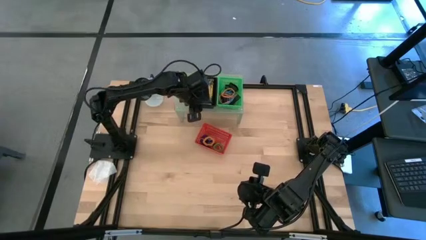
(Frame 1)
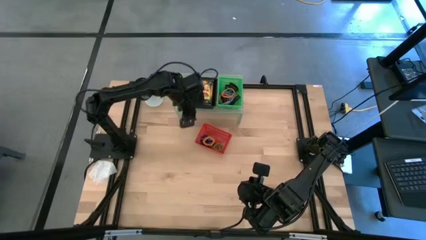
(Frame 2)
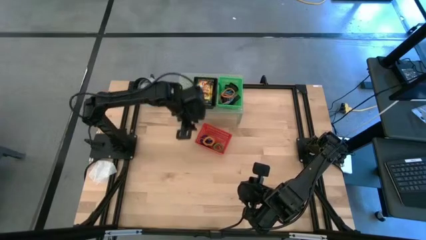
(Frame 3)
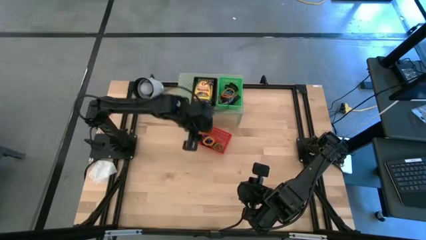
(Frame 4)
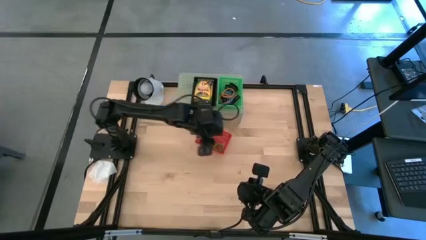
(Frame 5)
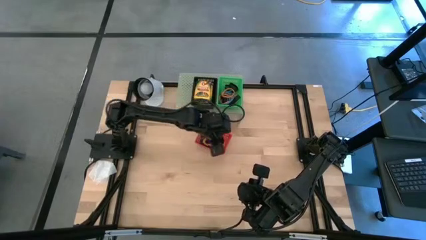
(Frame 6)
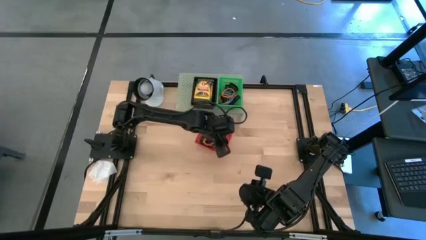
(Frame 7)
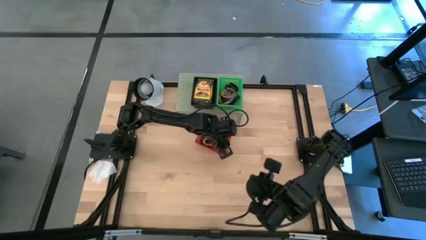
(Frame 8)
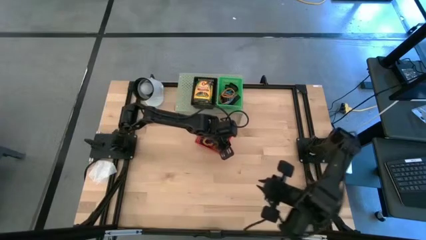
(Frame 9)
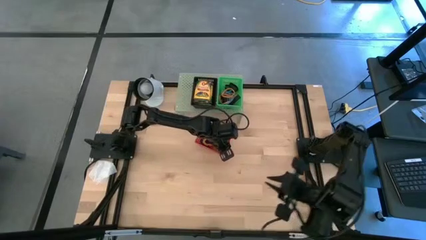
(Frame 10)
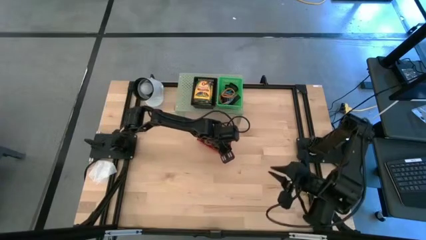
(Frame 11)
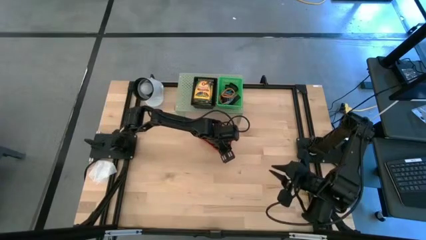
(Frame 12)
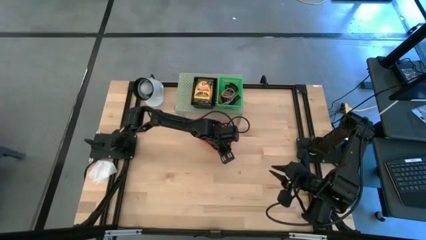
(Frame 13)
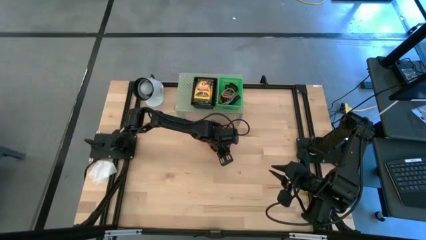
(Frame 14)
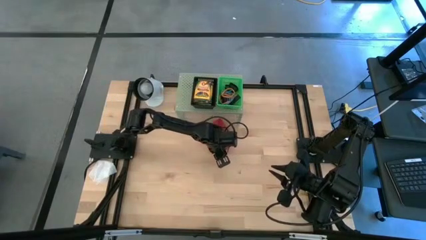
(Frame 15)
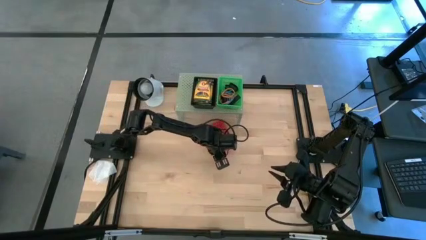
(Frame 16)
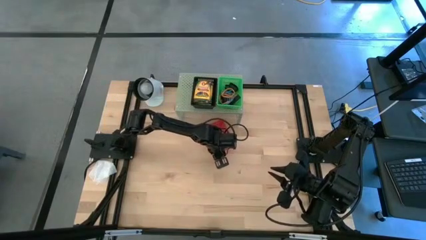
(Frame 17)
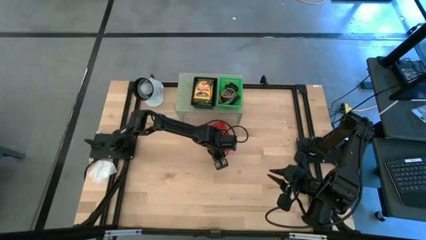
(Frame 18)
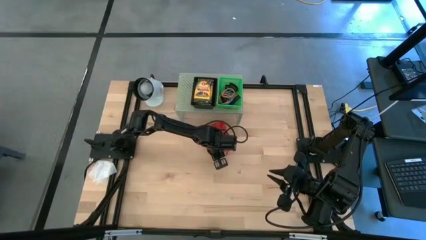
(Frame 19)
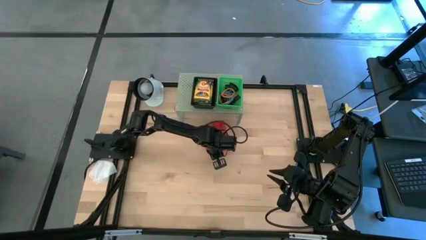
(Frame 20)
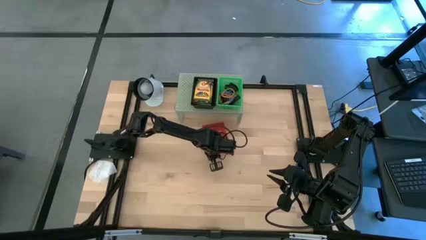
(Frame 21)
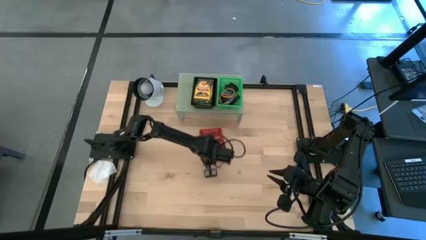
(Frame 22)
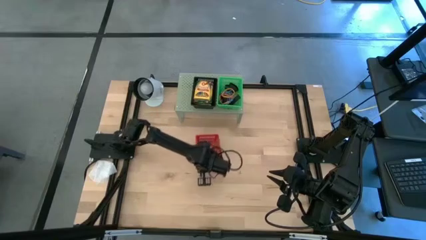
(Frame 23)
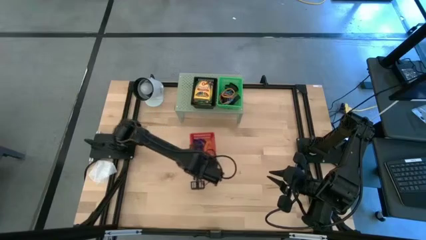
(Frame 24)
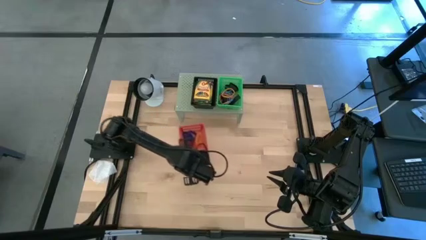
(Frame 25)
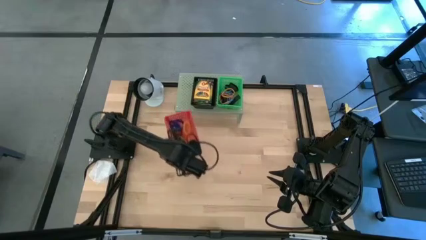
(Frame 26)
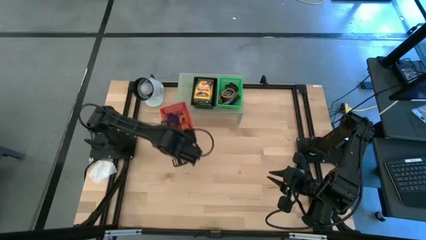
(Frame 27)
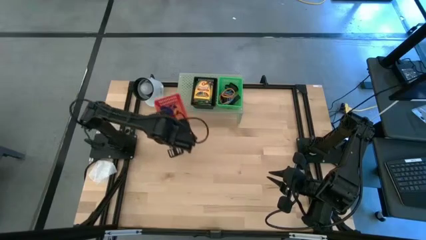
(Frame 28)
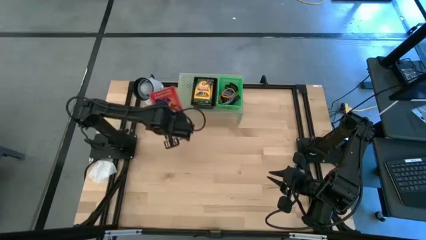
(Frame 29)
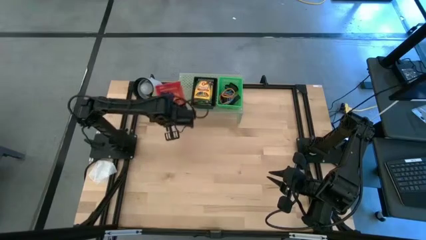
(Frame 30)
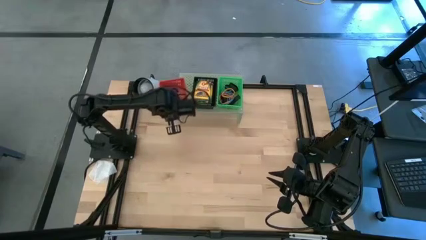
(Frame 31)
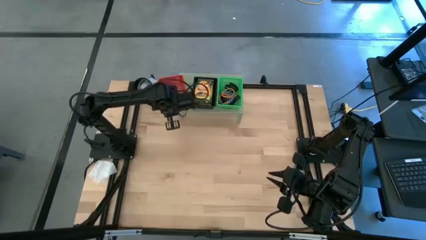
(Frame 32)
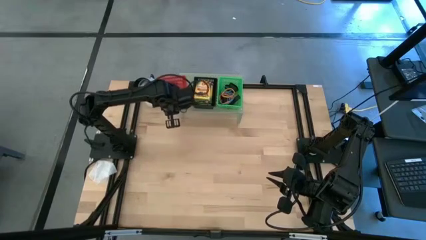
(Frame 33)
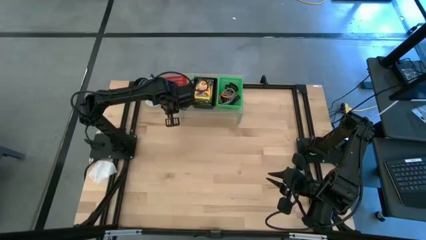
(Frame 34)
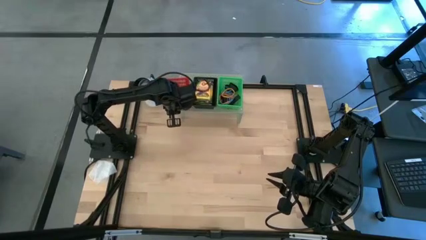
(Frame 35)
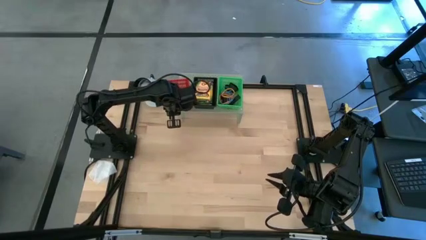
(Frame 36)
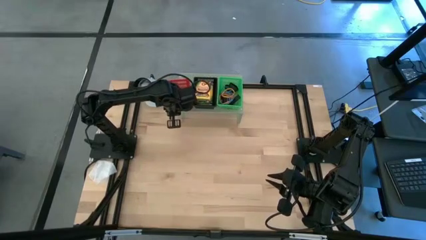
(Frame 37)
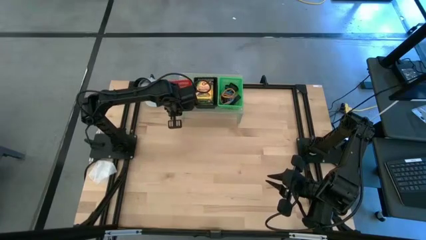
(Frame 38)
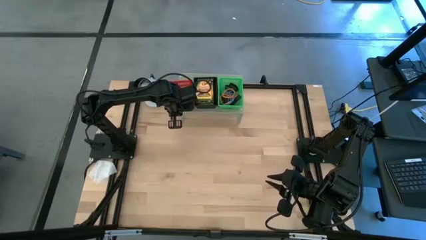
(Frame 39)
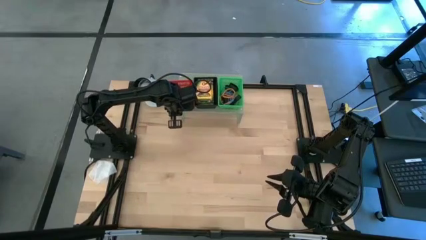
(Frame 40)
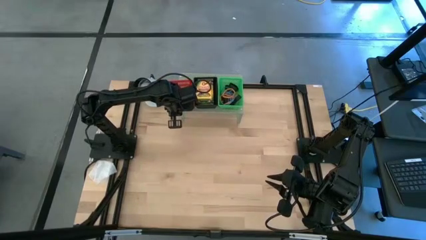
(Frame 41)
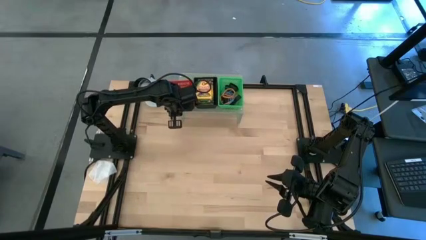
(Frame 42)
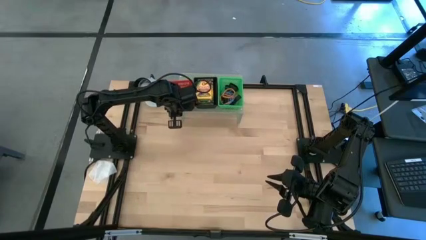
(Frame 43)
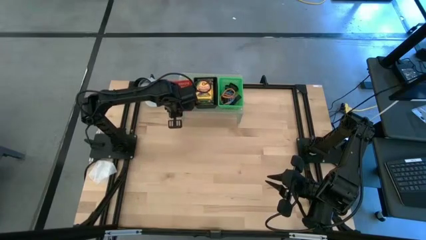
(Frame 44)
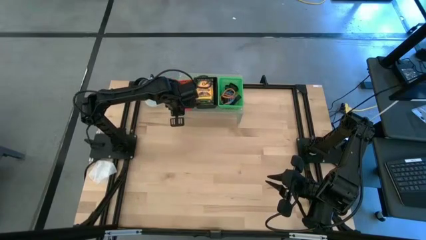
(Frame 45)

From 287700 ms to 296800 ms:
Task: Pick & Place Office Desk Supplies
Put the red bin filled with spring keychains on the shelf

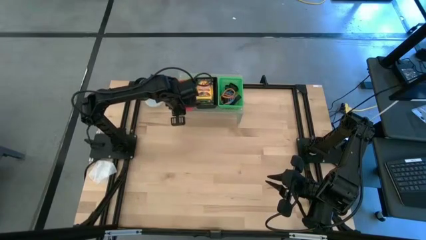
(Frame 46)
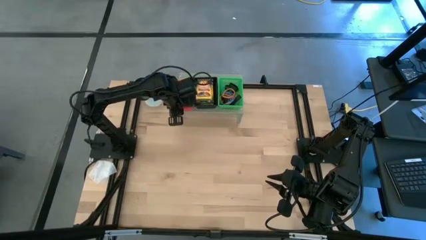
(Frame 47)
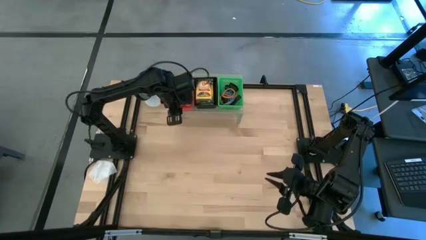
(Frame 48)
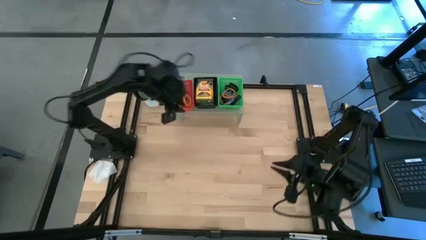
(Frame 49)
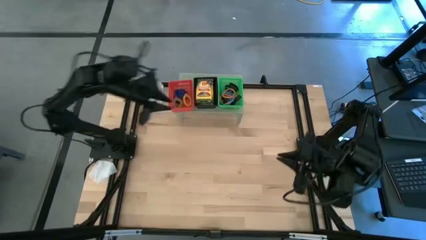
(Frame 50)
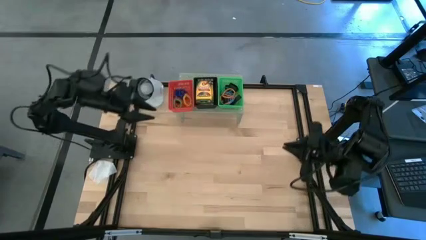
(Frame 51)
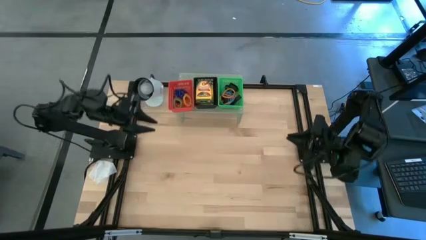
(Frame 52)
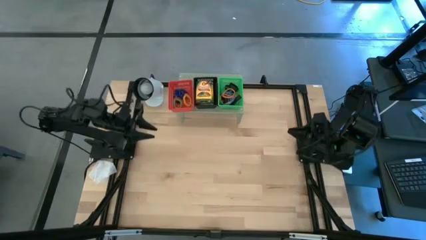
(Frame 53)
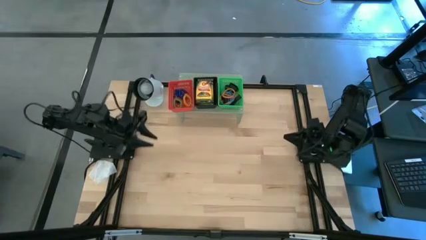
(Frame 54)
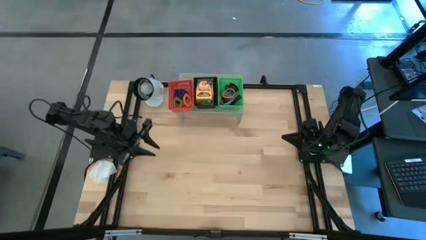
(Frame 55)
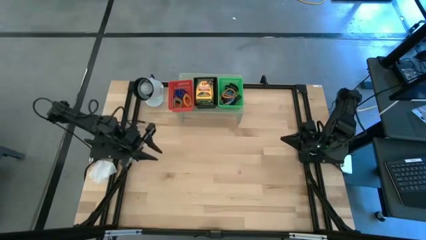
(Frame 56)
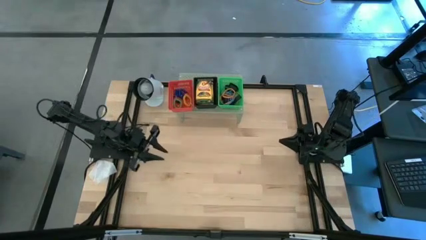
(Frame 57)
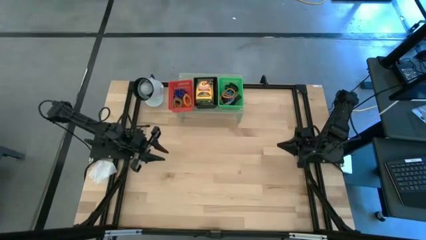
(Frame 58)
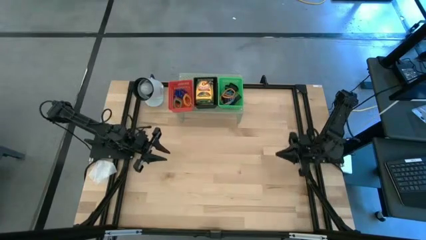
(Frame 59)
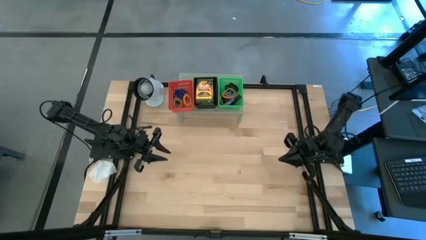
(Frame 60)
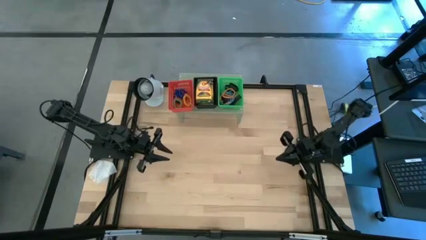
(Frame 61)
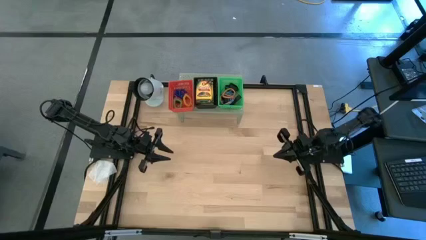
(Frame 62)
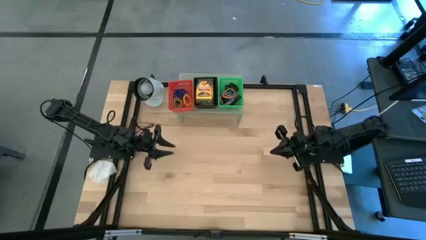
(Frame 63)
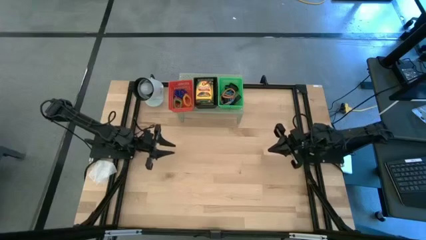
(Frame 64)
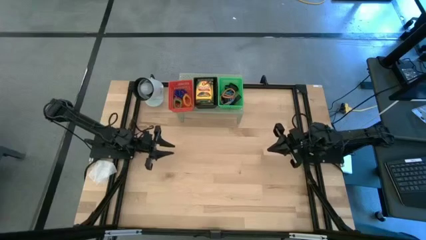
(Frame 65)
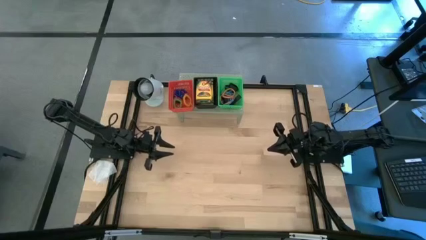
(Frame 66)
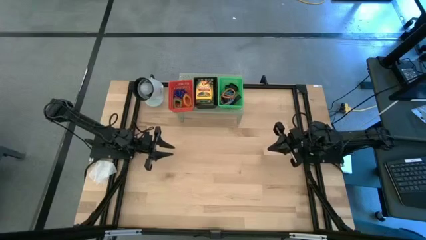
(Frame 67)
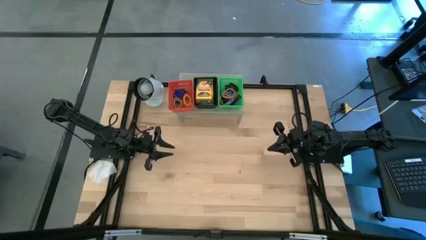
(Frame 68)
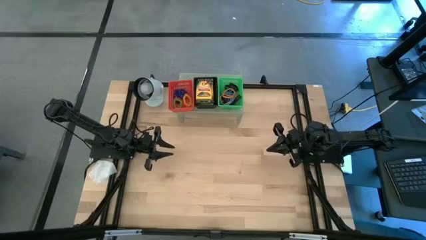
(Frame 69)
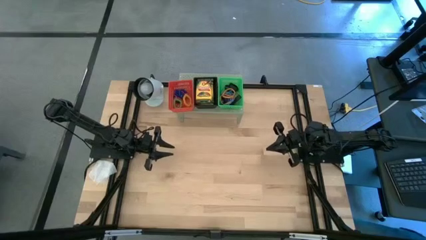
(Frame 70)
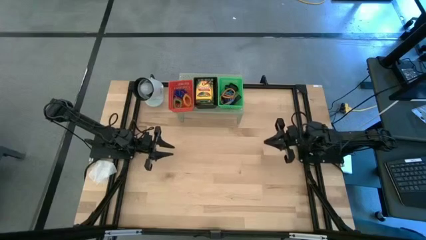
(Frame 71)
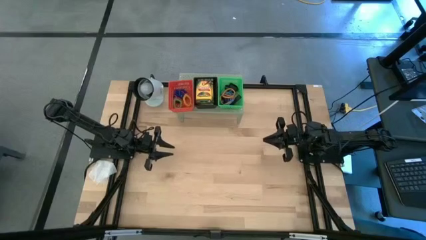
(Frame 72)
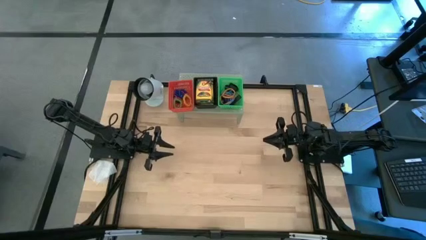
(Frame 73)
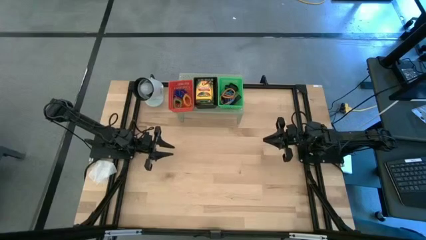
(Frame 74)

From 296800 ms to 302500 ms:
Return to Home Position
